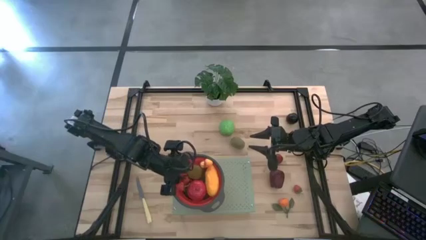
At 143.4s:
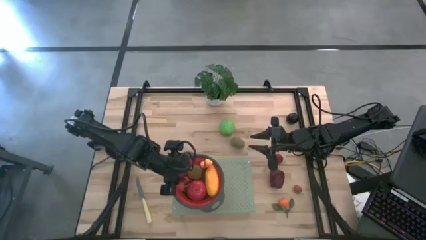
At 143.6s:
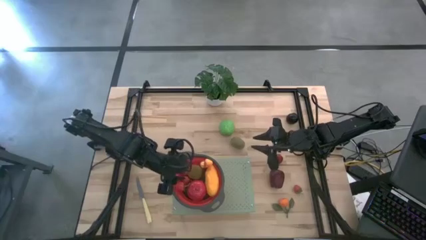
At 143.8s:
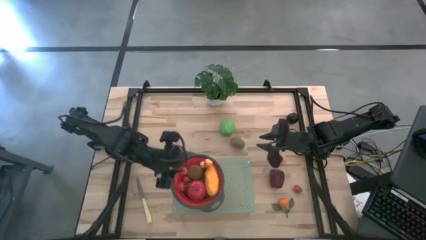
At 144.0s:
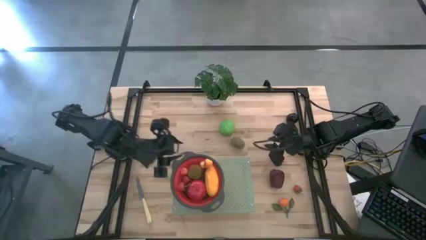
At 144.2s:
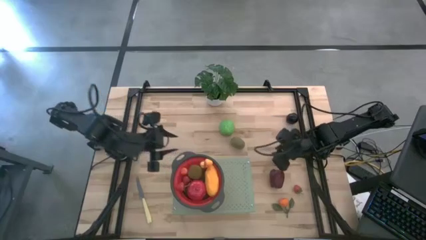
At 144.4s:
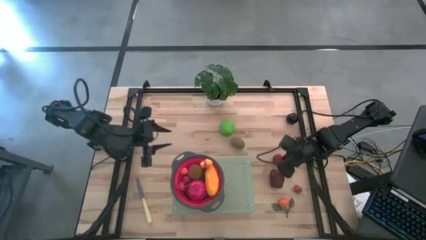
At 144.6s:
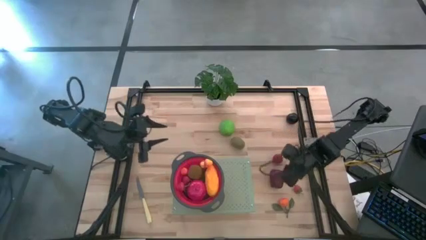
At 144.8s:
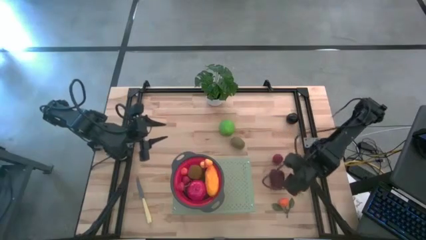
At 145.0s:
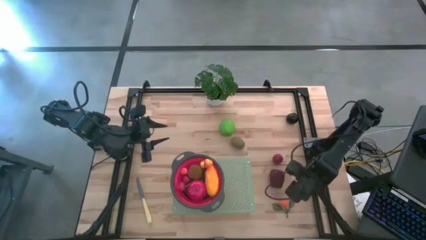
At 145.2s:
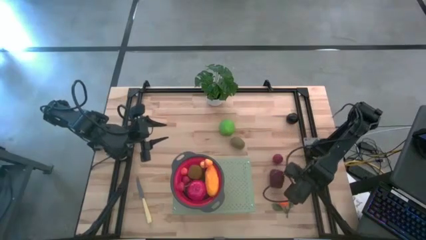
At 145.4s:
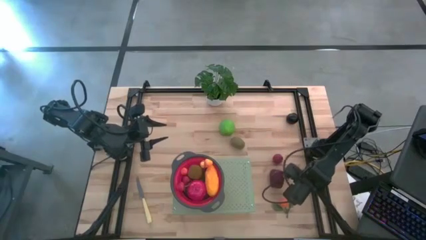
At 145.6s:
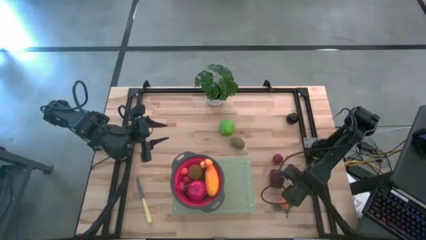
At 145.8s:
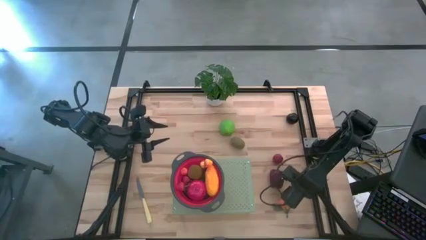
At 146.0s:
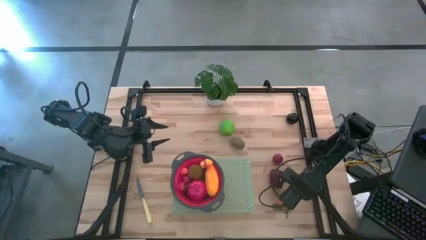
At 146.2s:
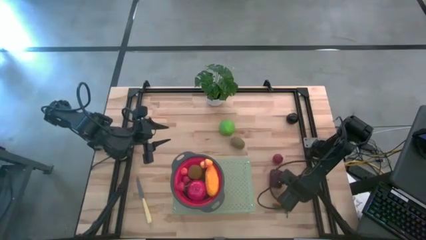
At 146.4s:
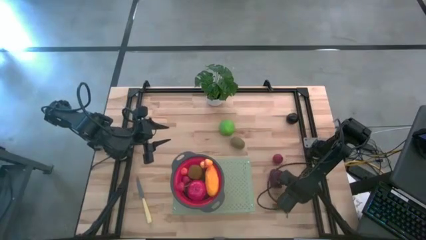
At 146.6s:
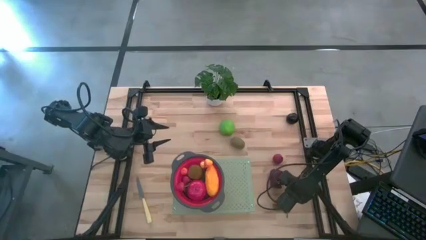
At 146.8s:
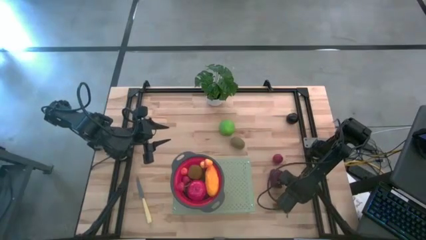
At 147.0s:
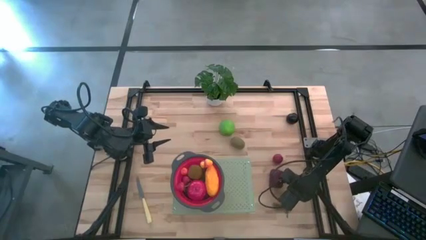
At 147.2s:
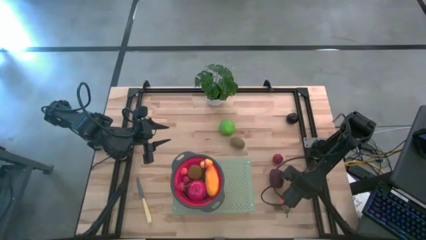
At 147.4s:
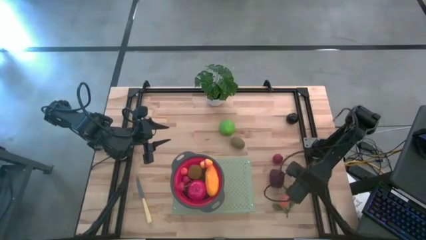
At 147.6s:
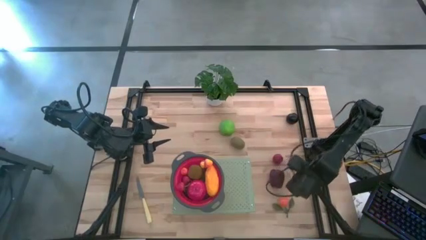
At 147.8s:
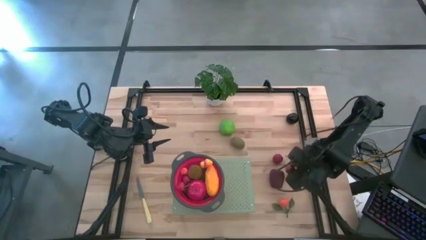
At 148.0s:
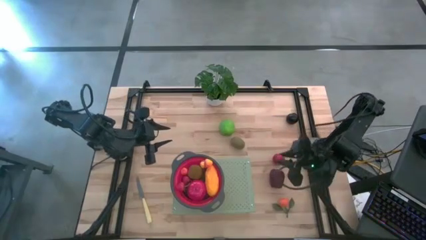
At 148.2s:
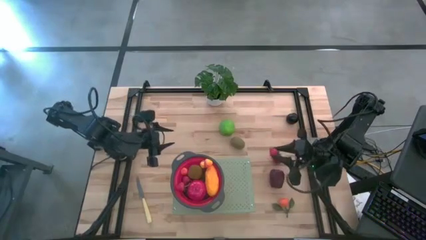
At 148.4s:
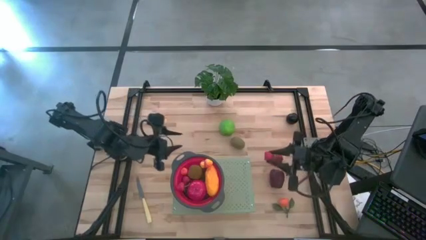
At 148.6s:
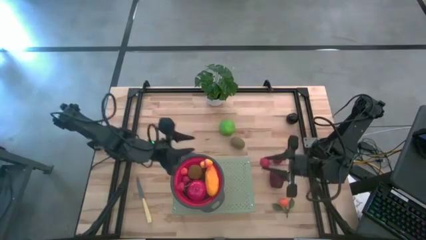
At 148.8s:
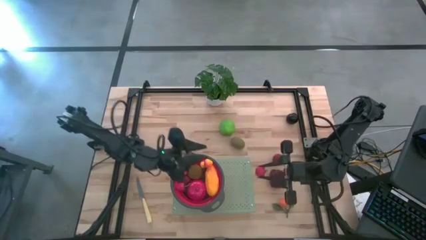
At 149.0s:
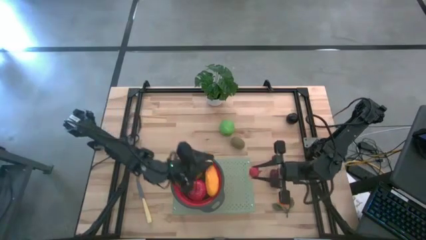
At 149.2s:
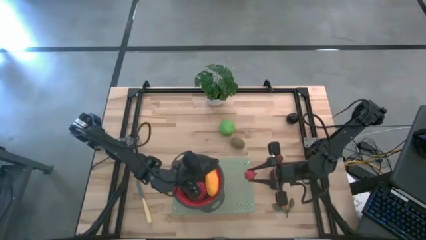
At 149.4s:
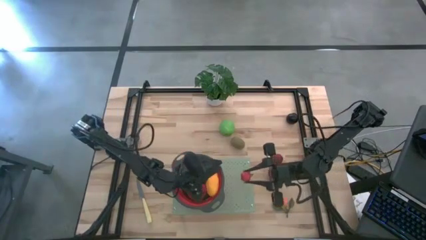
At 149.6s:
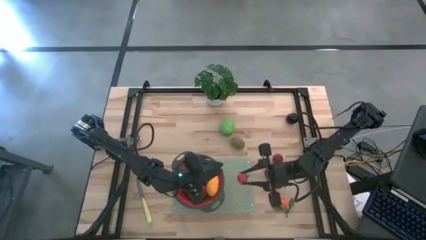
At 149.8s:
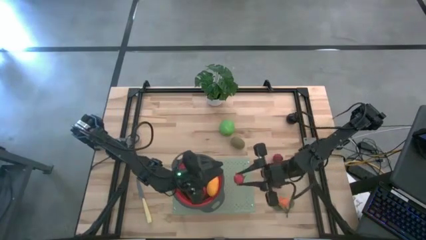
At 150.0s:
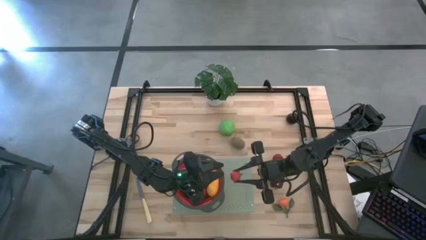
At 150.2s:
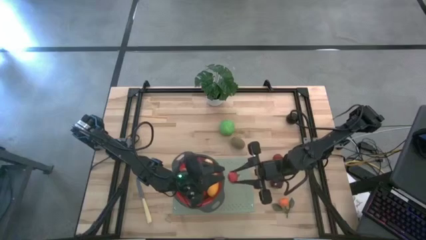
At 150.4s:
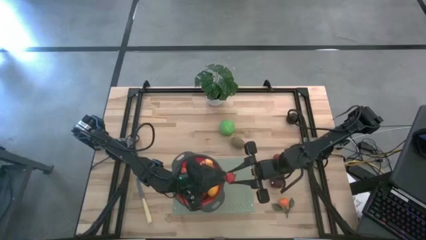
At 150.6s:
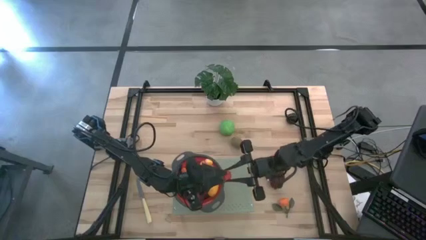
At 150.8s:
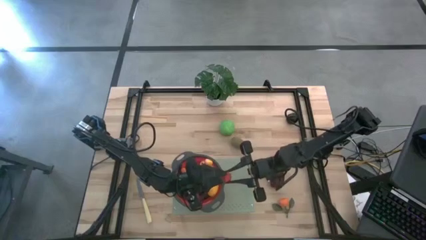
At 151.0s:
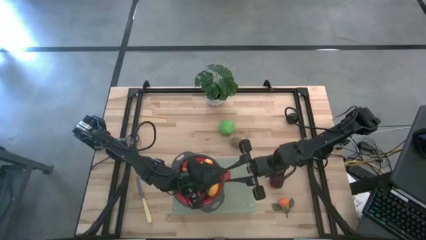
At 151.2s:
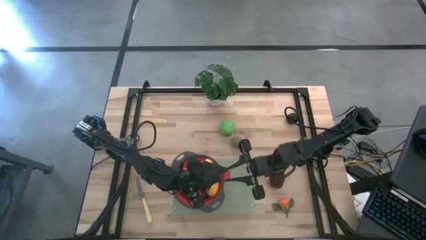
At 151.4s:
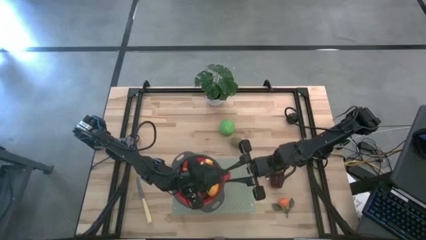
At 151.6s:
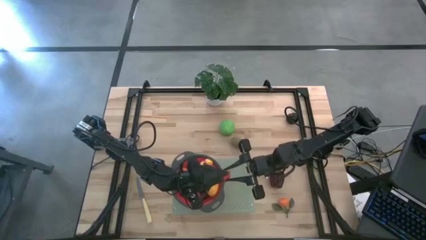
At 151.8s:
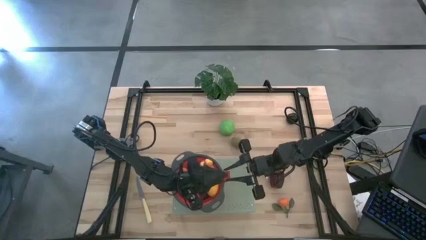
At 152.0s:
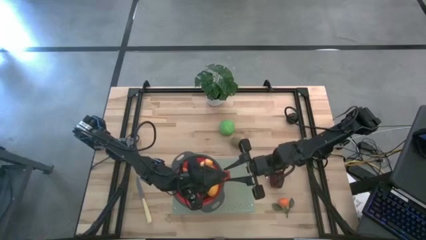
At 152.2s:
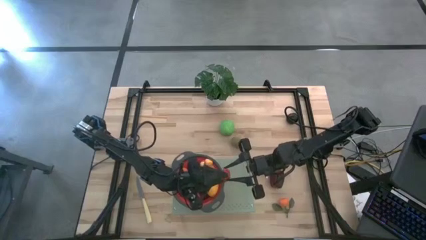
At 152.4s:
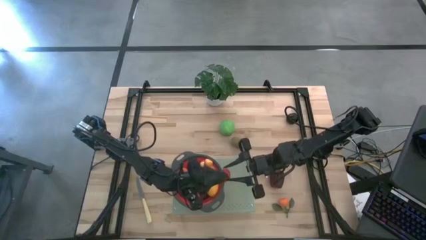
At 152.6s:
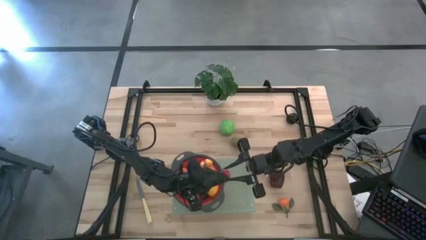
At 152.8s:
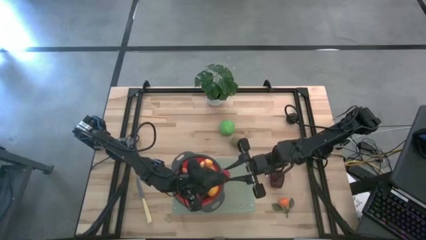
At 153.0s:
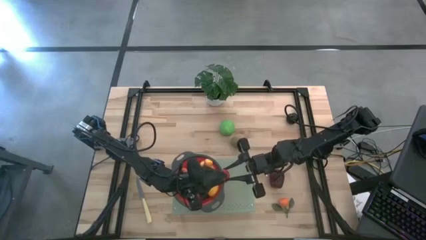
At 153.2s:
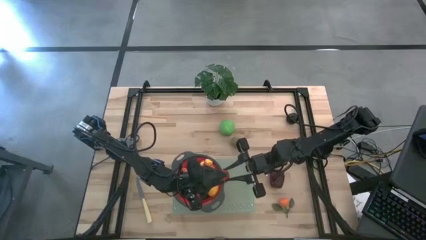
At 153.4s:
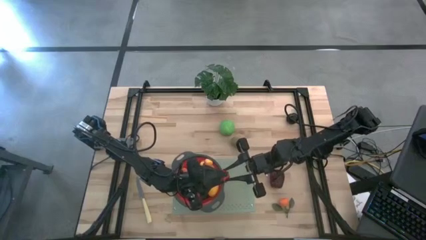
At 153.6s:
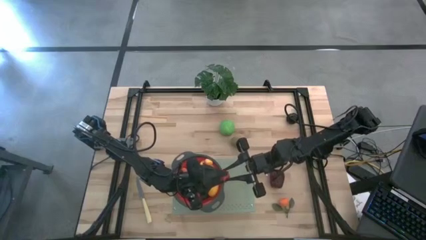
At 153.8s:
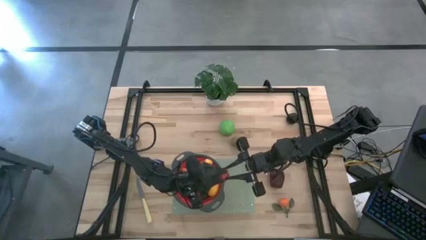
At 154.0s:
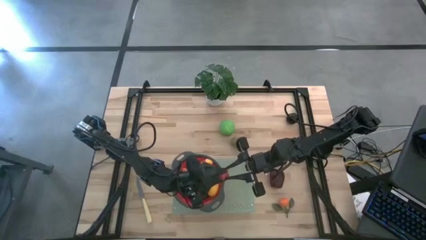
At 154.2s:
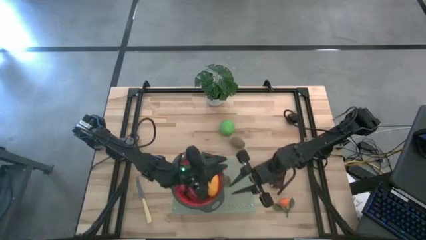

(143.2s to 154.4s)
Task: Pick & Place Fruit
Put the strawberry into the red strainer

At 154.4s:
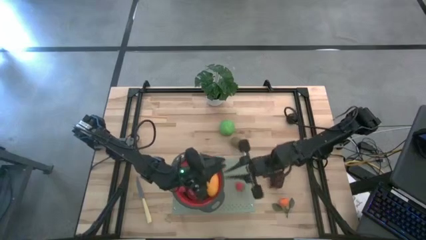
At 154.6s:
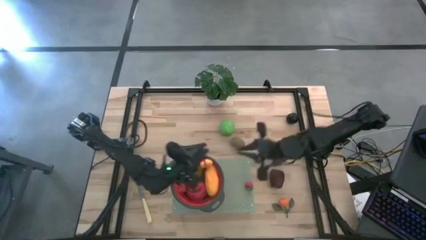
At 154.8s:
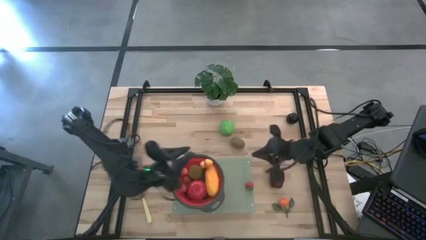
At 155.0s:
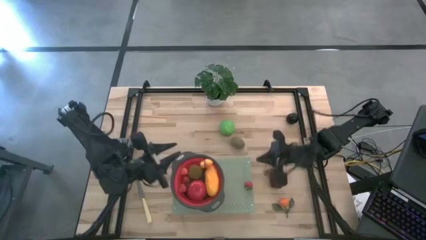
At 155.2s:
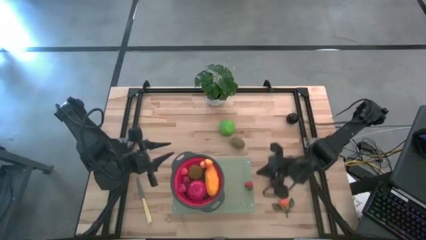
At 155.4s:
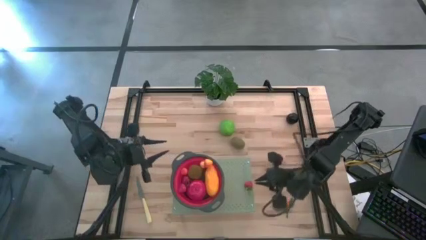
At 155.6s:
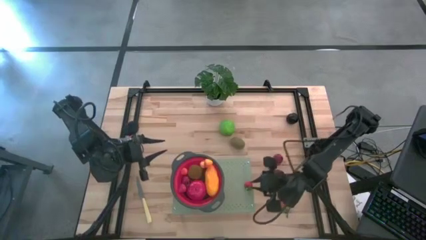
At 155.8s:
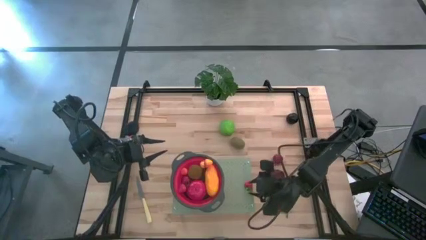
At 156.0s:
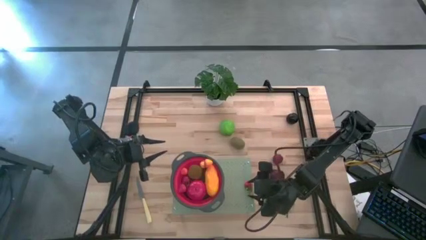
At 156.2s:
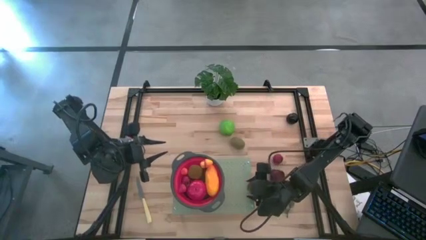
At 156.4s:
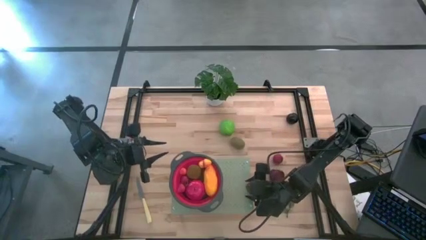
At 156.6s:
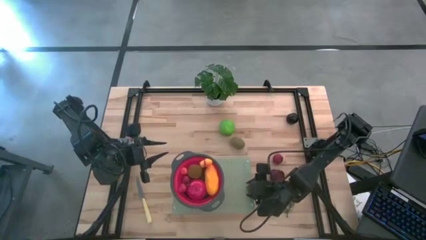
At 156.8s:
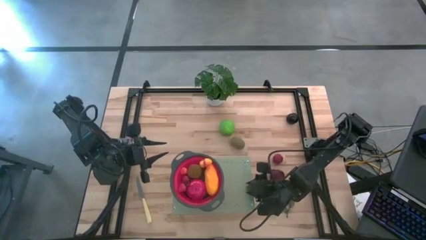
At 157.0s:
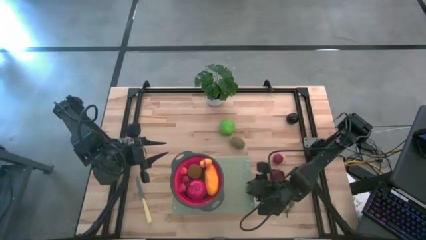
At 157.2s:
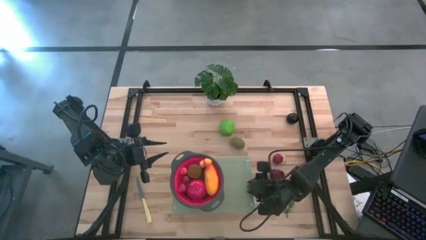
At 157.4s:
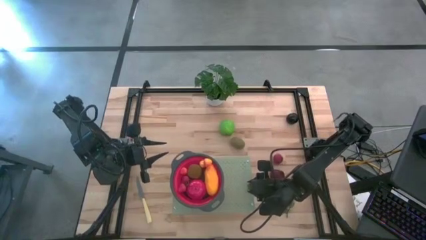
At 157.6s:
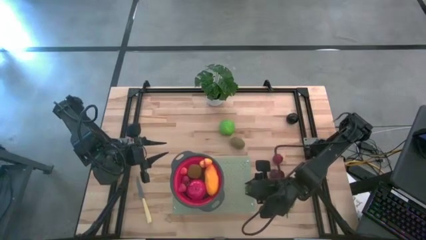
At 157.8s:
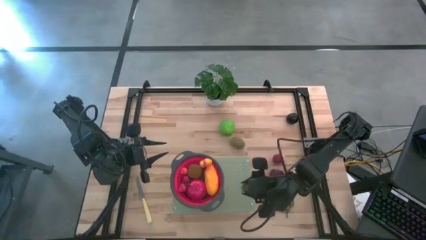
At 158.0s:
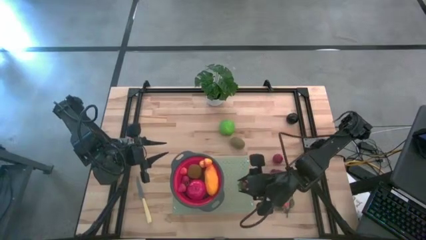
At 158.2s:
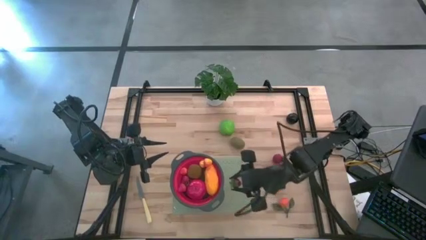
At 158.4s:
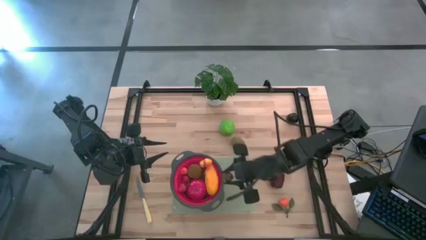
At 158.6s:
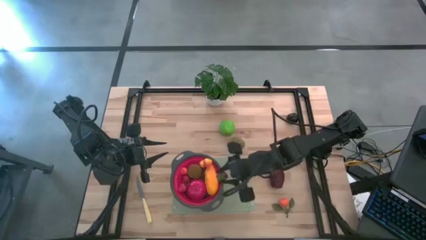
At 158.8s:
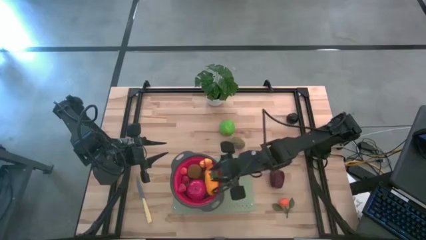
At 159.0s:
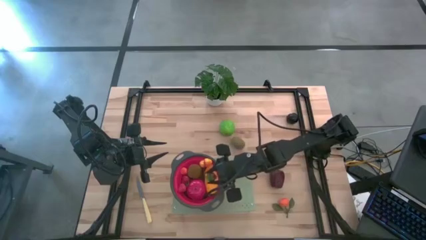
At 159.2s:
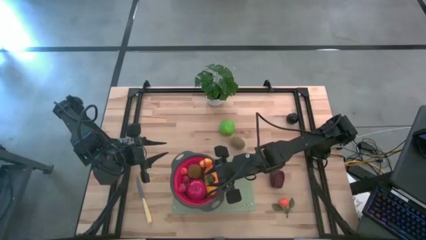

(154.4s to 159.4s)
Put the strawberry into the red strainer
